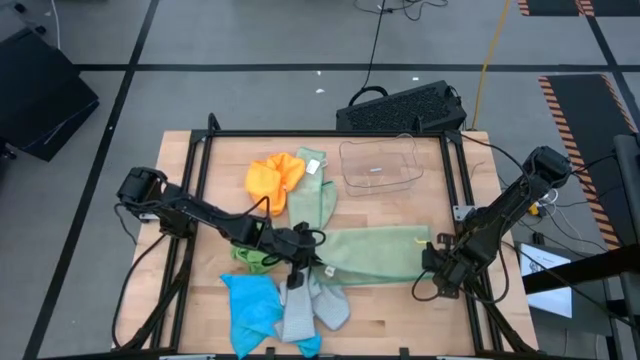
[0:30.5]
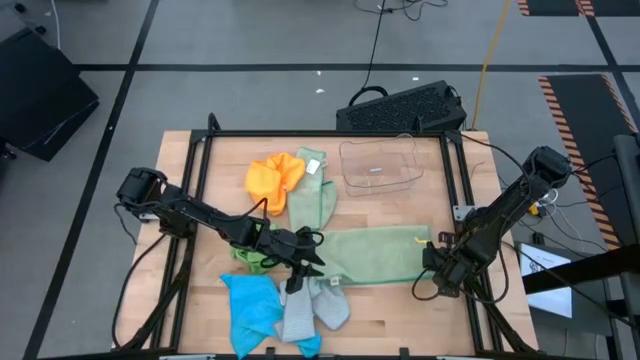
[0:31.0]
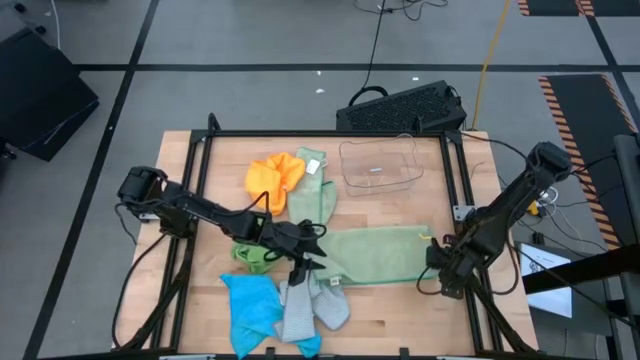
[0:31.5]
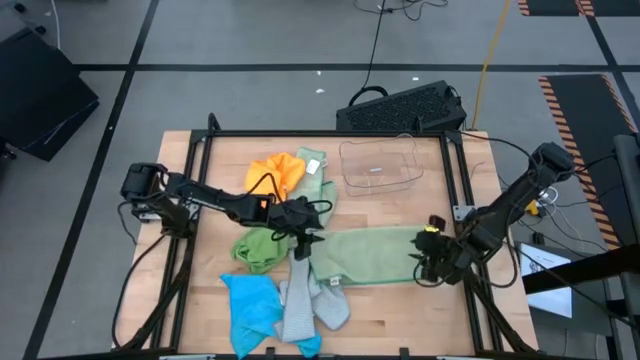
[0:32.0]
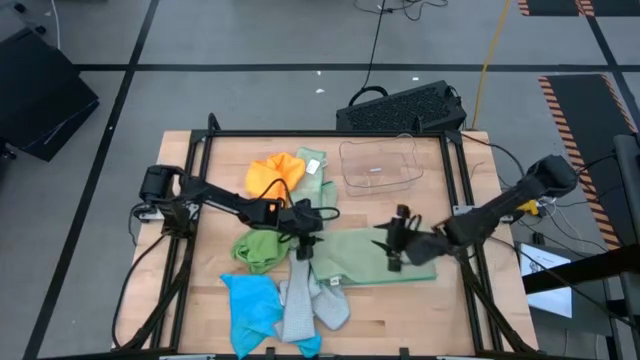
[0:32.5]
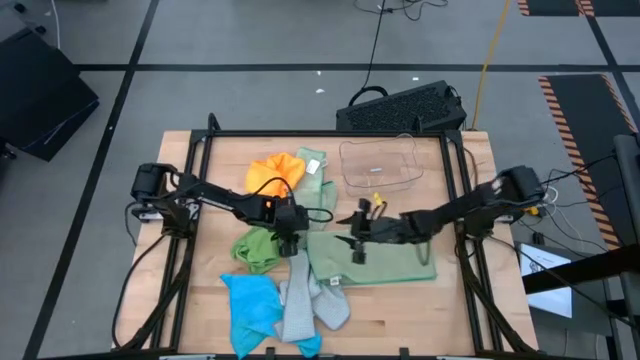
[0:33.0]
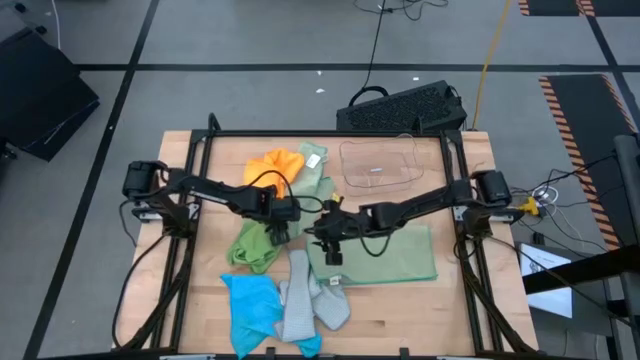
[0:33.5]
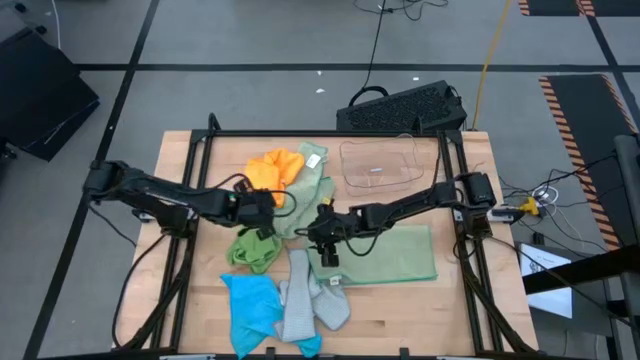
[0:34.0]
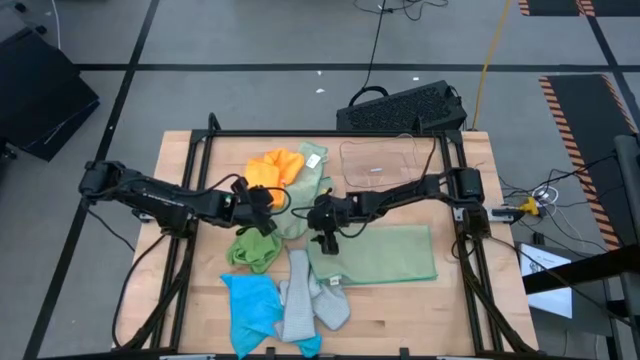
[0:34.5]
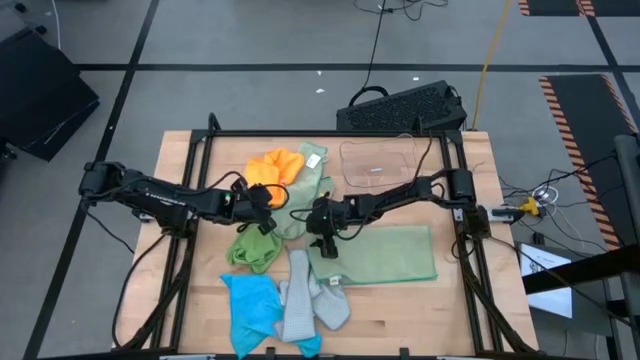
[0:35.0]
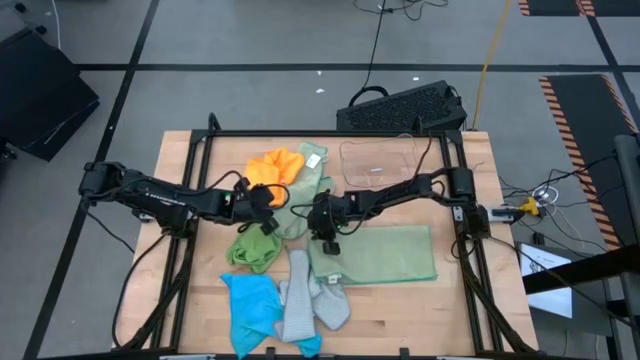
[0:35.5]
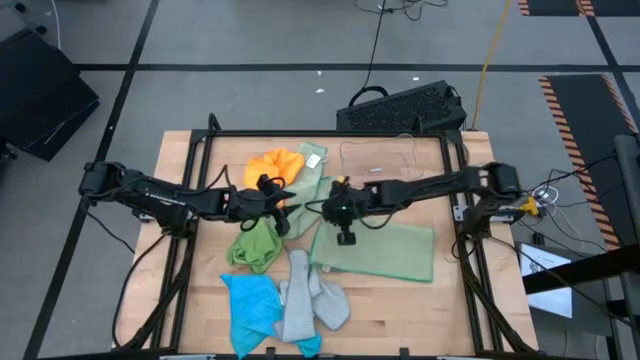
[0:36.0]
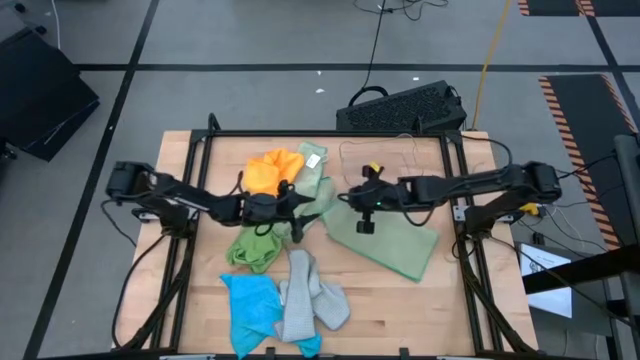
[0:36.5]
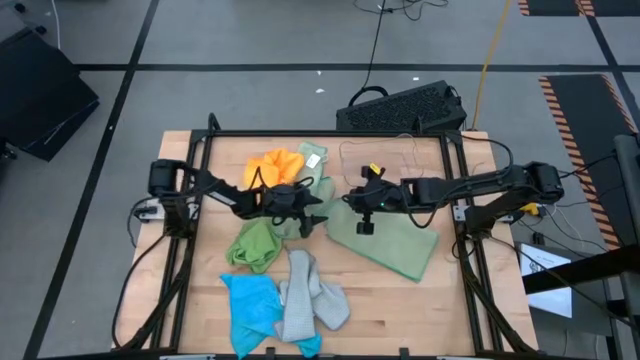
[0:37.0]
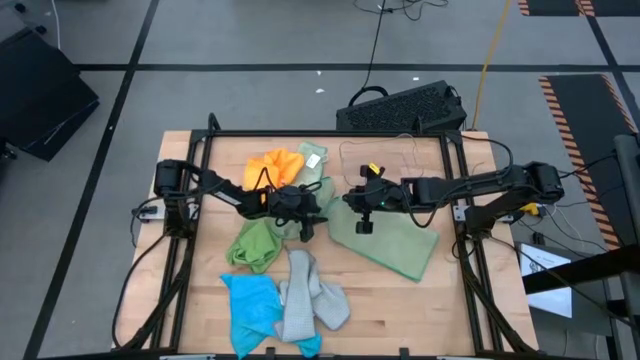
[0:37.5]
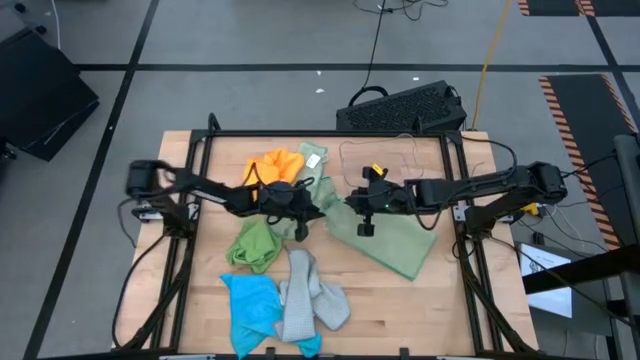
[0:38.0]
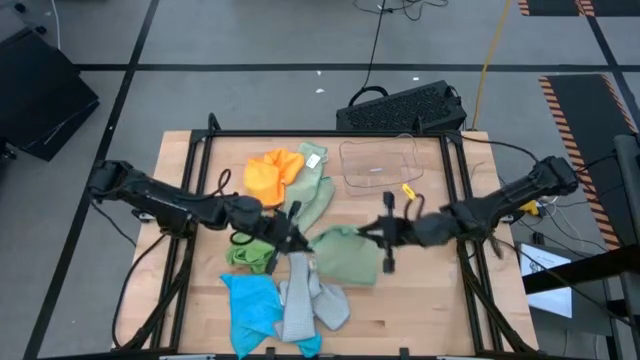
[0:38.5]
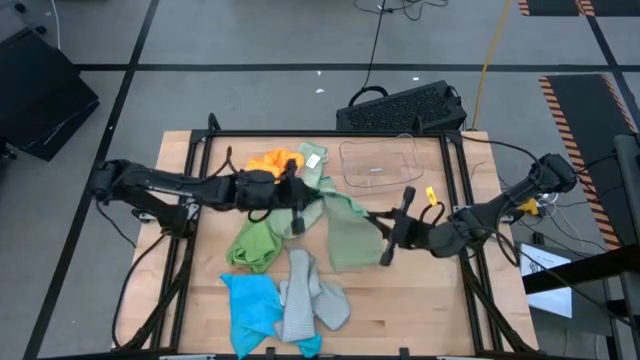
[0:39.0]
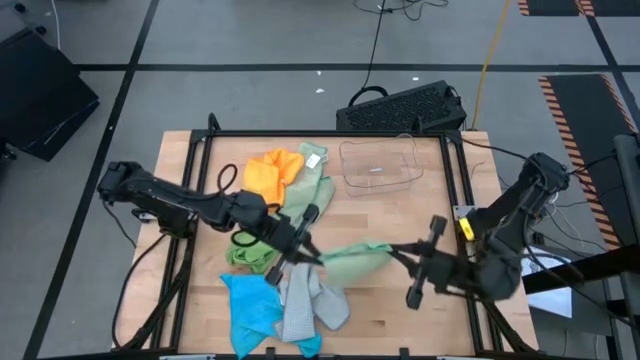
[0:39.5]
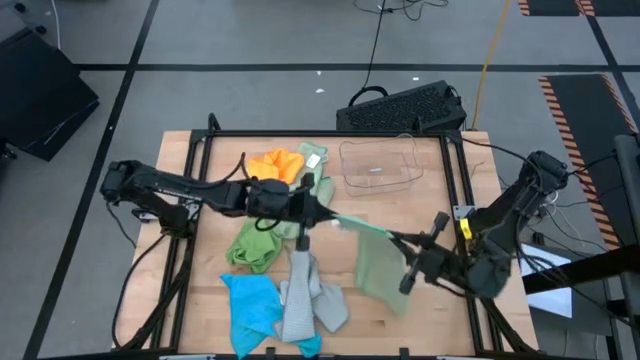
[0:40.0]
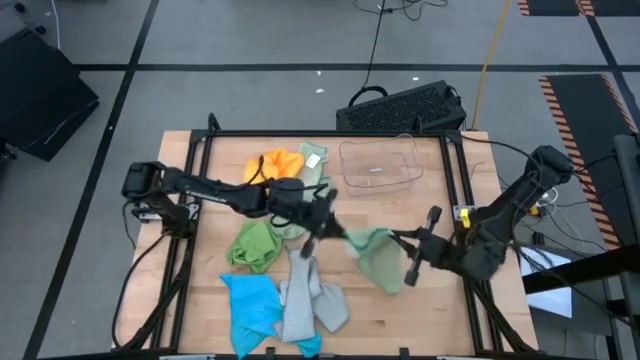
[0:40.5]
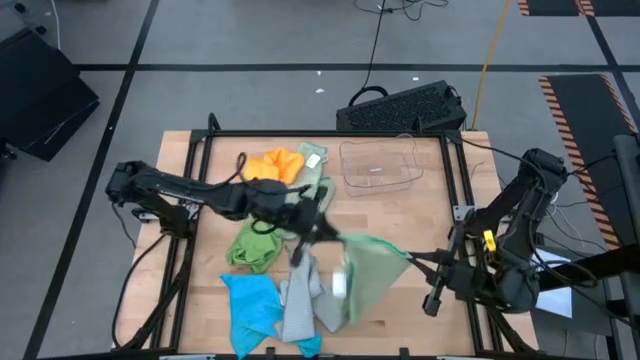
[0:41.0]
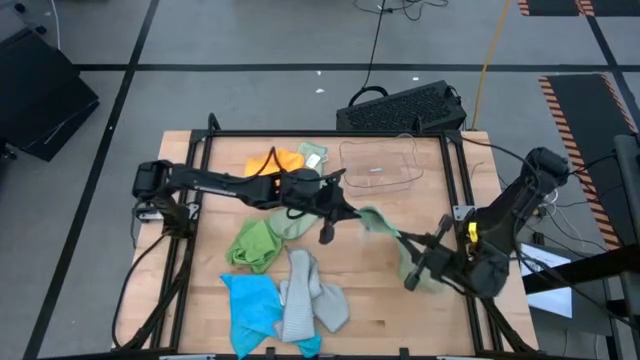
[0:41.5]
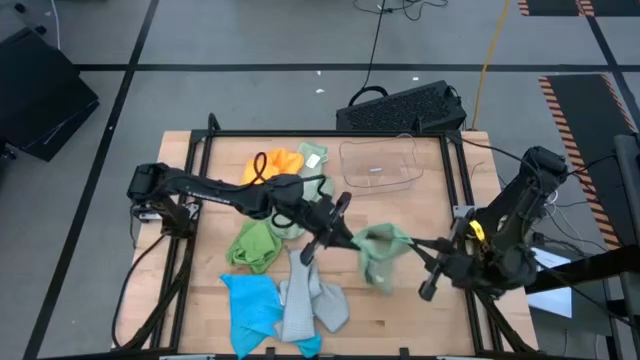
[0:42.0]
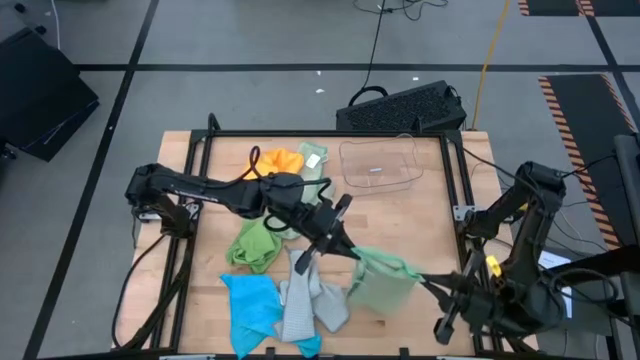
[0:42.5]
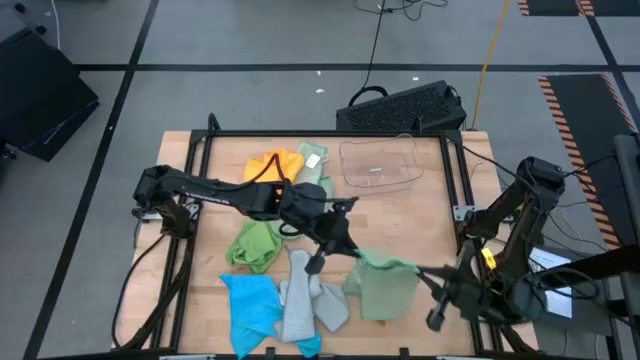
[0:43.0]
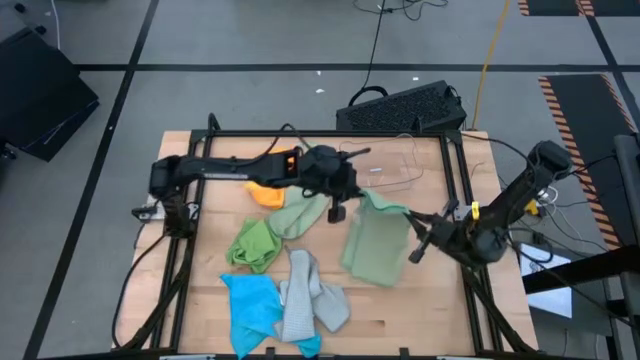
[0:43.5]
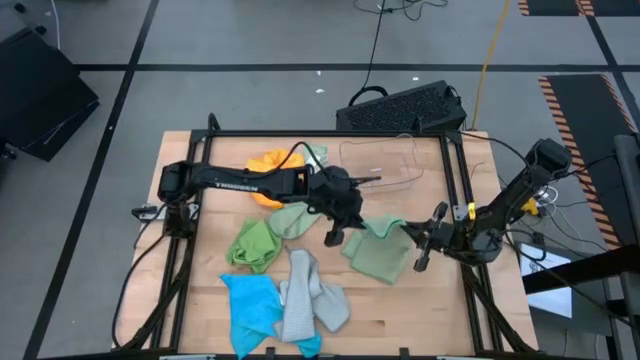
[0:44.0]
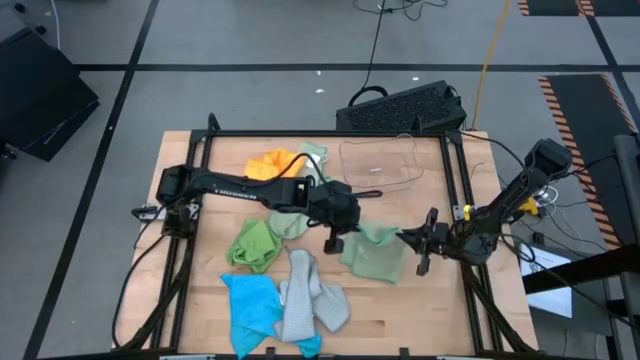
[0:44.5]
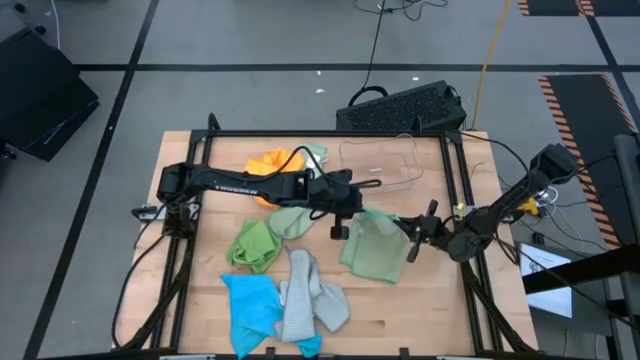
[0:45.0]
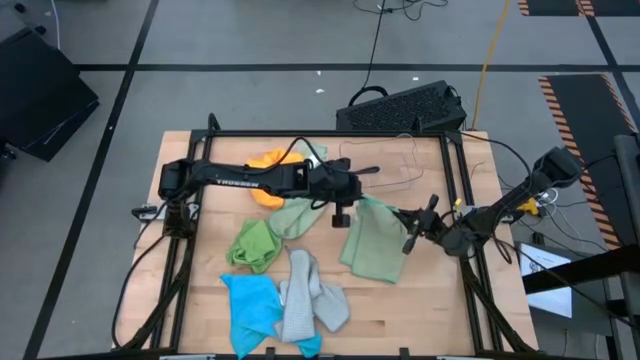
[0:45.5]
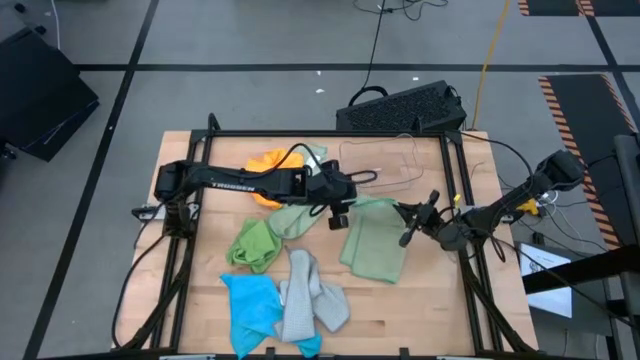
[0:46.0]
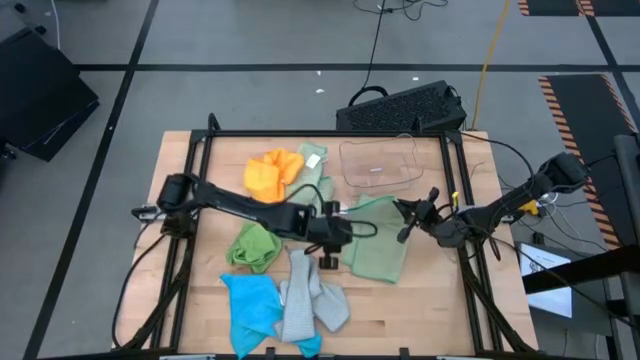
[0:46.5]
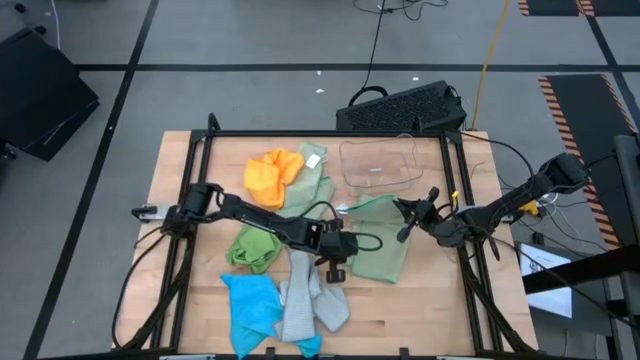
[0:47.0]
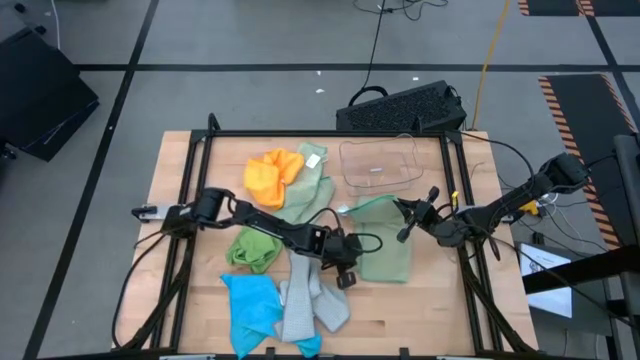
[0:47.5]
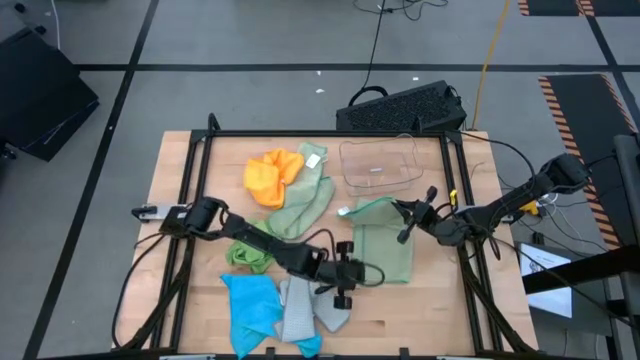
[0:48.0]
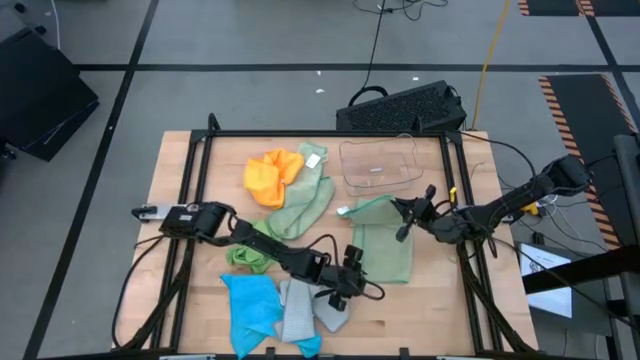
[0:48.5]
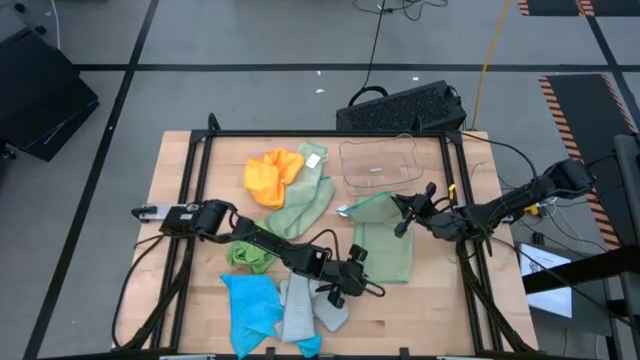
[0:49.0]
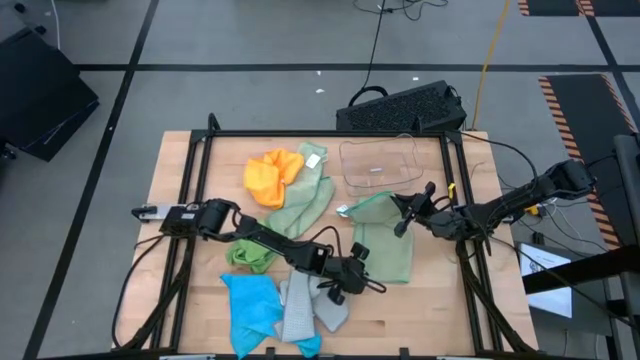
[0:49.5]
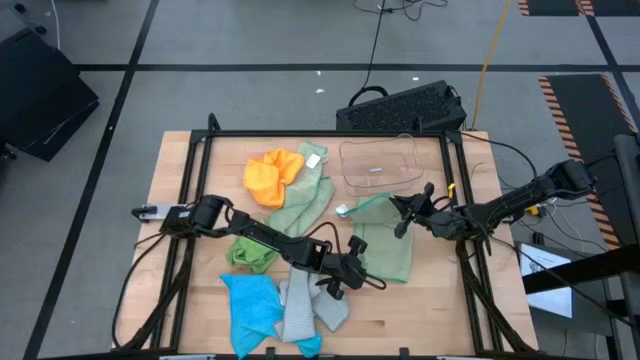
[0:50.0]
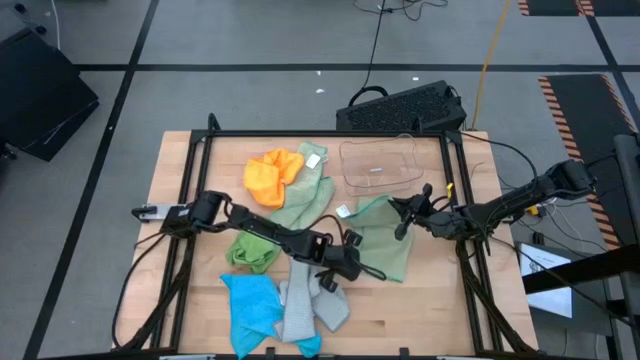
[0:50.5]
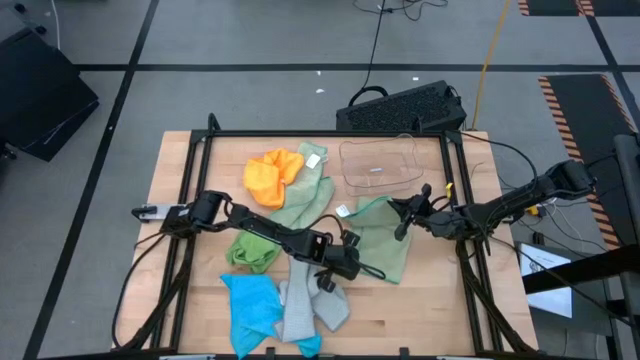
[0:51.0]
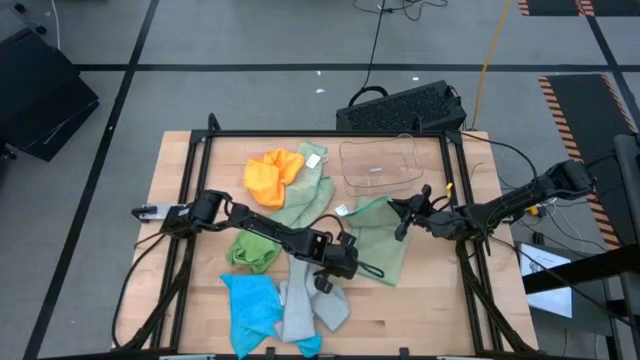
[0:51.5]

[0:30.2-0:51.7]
Task: Fold microfiber towels
Fold the bottom light green microfiber towel
